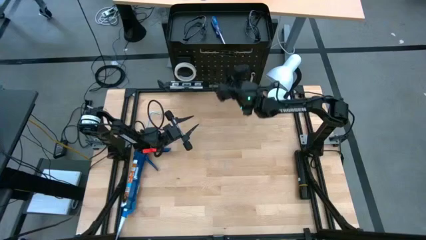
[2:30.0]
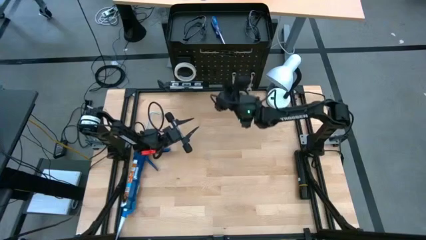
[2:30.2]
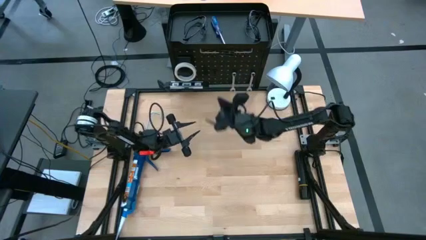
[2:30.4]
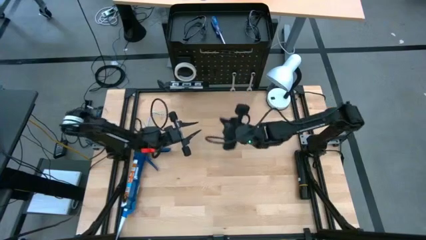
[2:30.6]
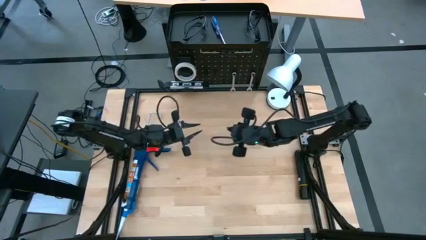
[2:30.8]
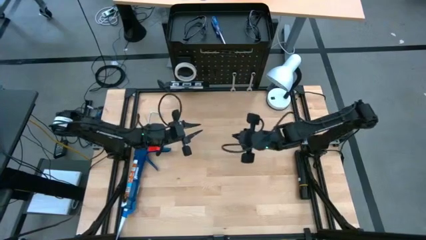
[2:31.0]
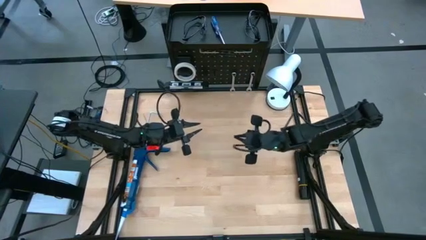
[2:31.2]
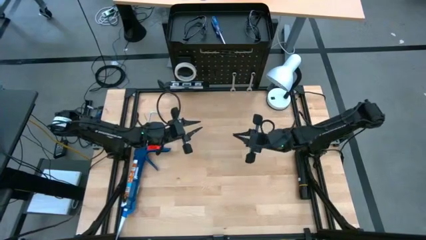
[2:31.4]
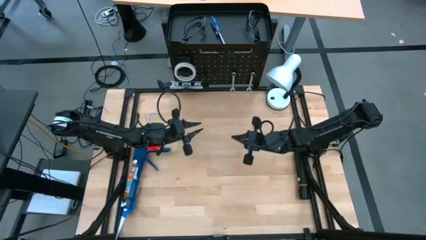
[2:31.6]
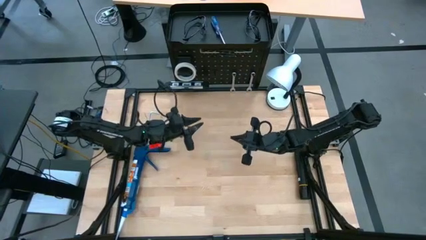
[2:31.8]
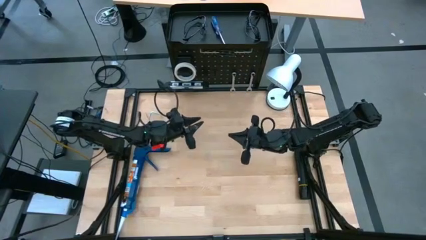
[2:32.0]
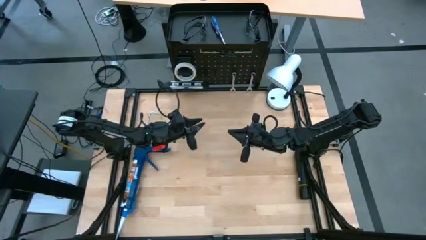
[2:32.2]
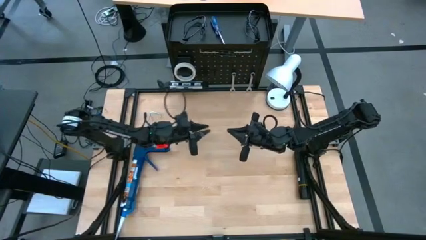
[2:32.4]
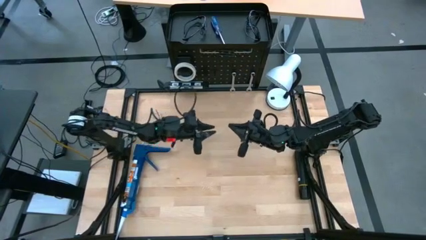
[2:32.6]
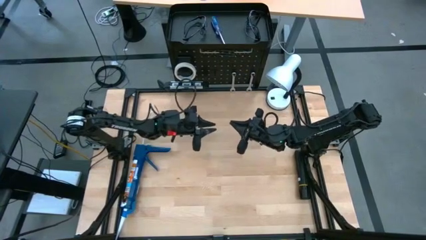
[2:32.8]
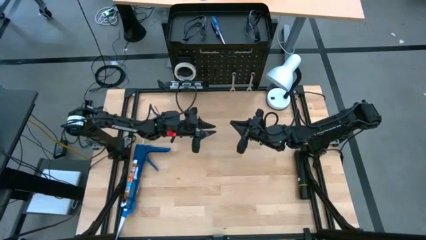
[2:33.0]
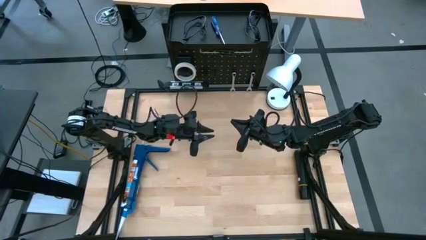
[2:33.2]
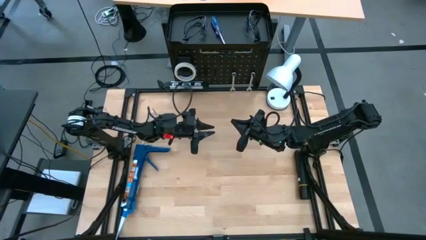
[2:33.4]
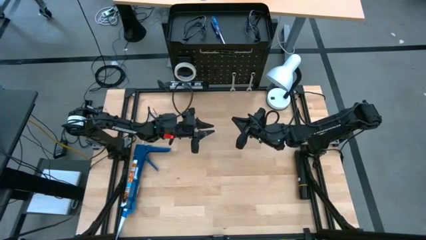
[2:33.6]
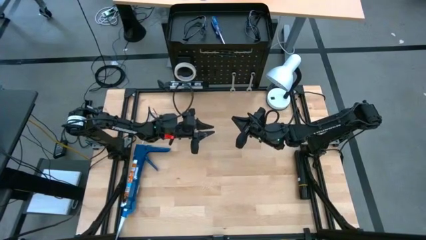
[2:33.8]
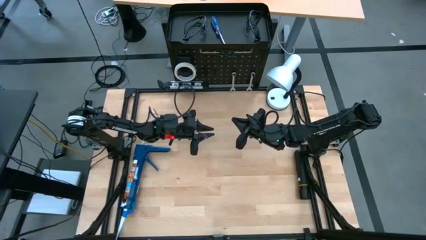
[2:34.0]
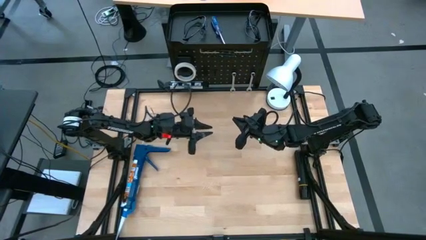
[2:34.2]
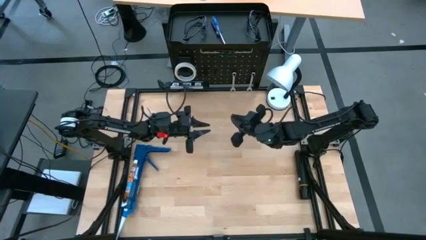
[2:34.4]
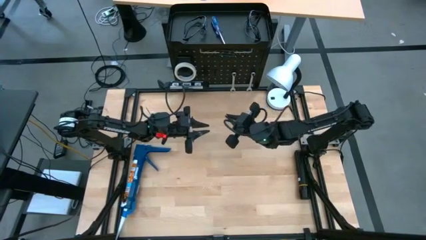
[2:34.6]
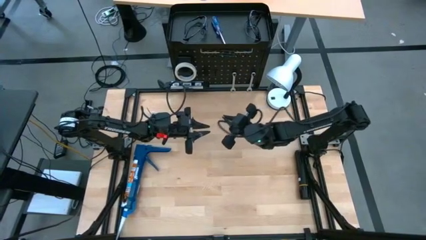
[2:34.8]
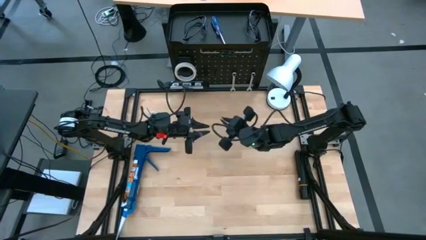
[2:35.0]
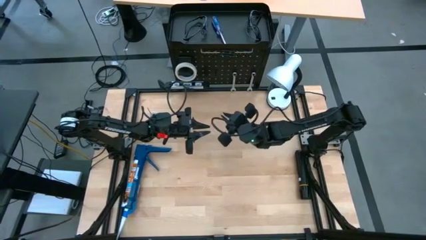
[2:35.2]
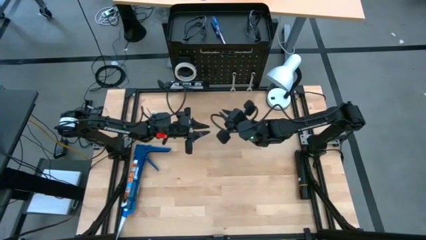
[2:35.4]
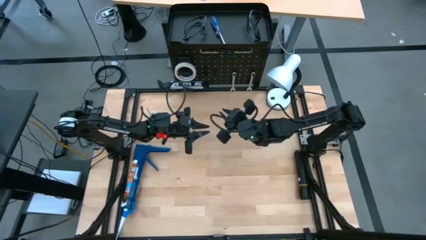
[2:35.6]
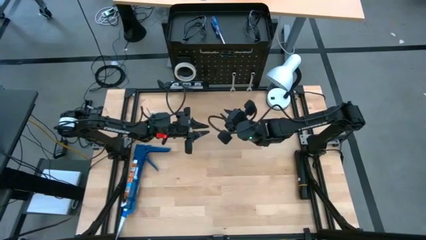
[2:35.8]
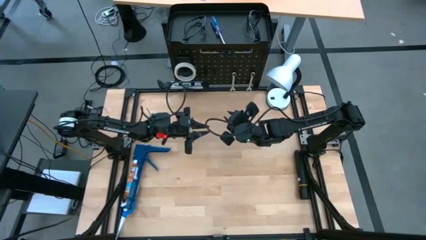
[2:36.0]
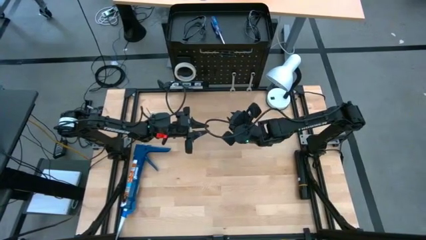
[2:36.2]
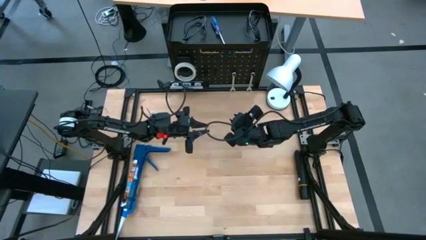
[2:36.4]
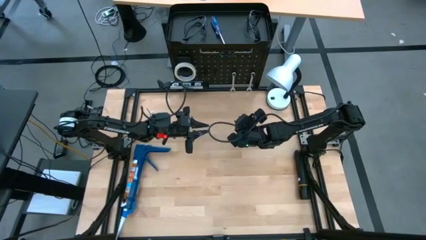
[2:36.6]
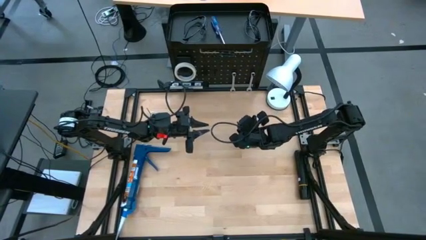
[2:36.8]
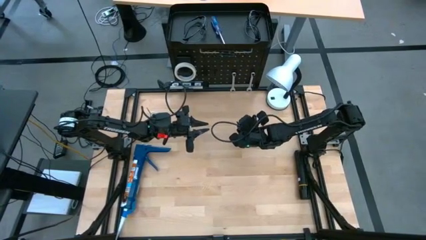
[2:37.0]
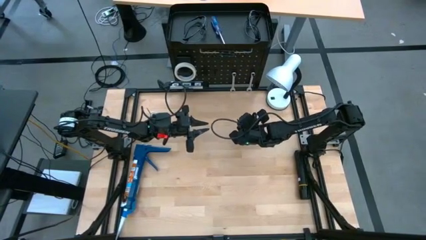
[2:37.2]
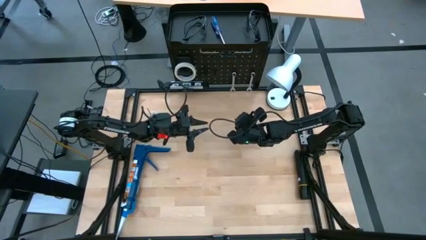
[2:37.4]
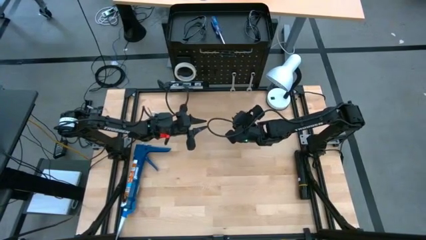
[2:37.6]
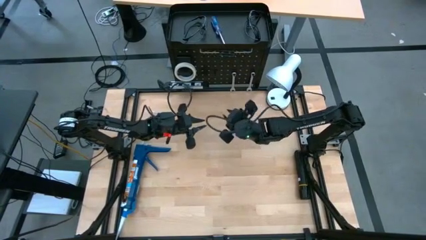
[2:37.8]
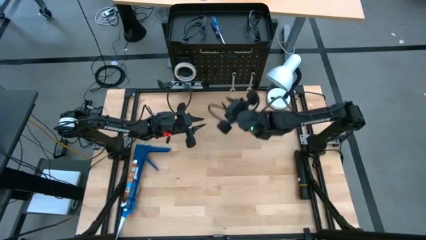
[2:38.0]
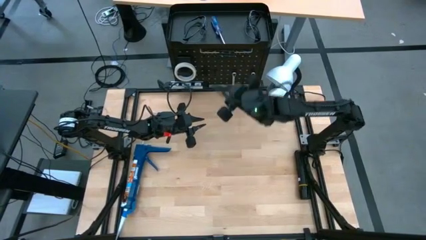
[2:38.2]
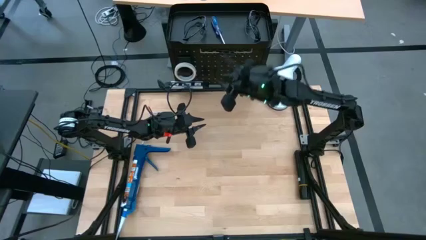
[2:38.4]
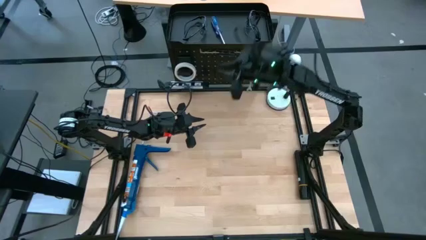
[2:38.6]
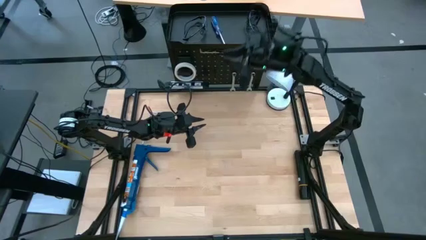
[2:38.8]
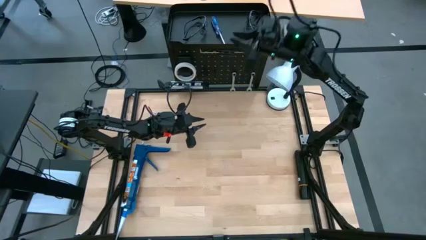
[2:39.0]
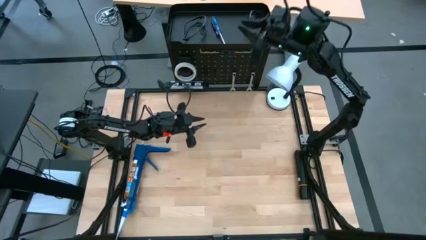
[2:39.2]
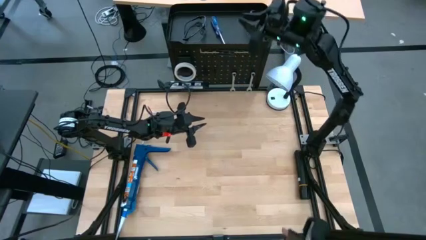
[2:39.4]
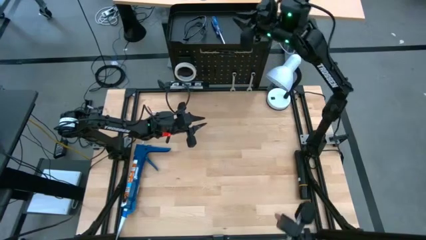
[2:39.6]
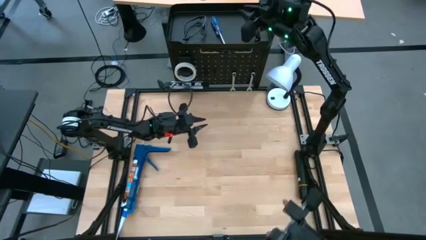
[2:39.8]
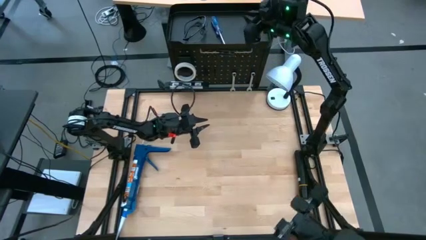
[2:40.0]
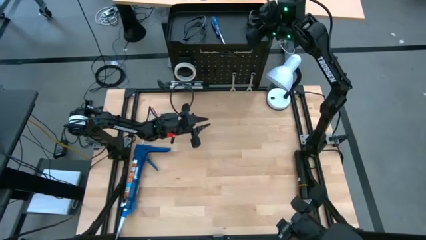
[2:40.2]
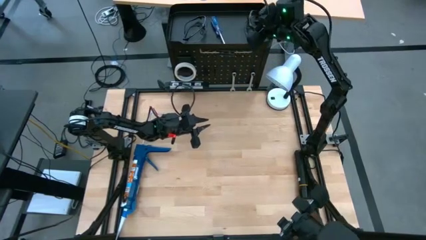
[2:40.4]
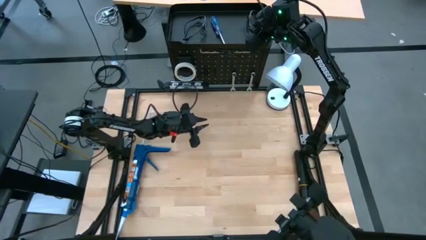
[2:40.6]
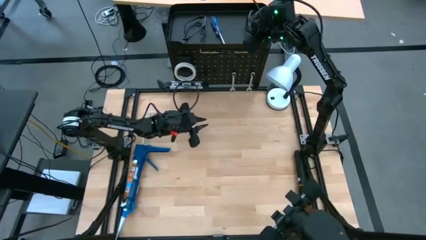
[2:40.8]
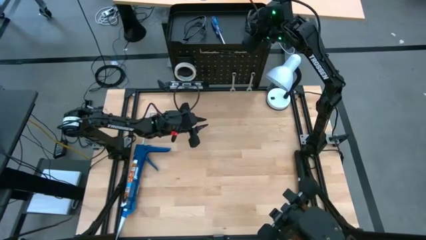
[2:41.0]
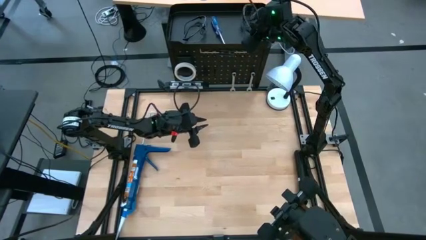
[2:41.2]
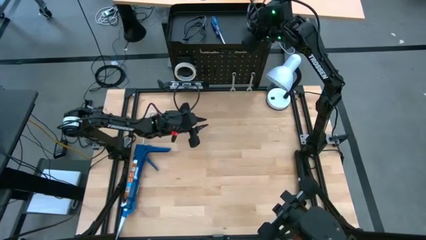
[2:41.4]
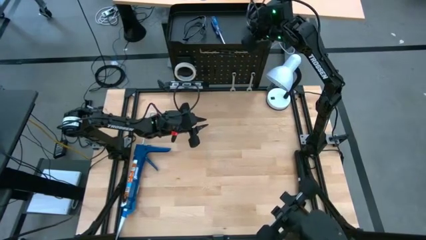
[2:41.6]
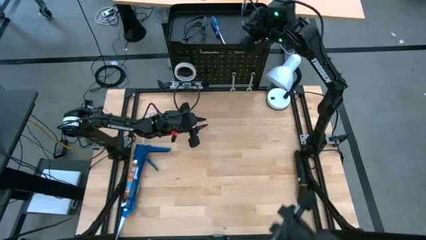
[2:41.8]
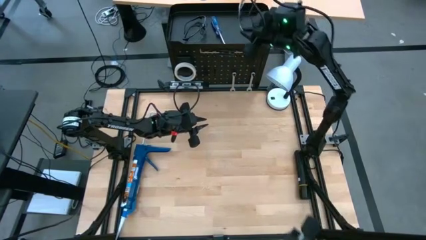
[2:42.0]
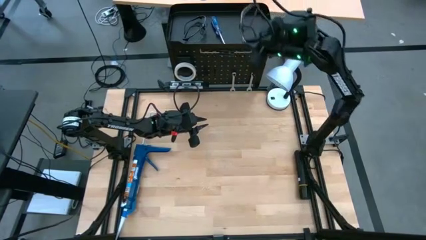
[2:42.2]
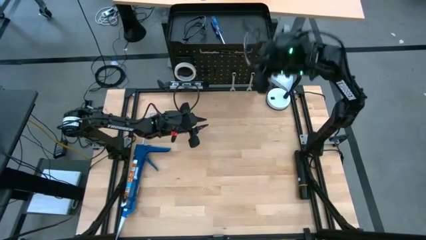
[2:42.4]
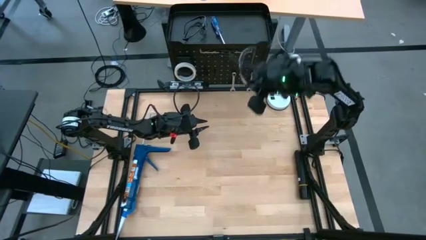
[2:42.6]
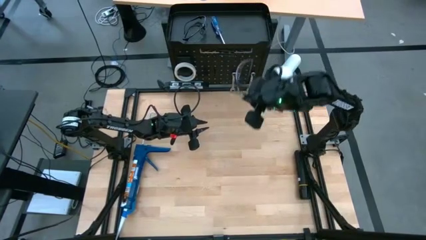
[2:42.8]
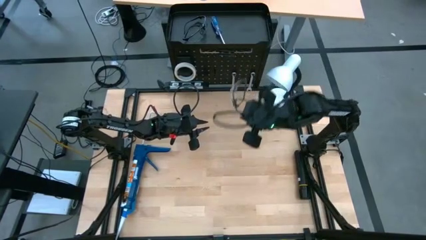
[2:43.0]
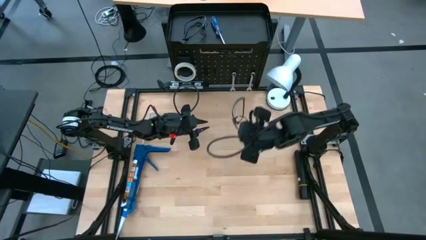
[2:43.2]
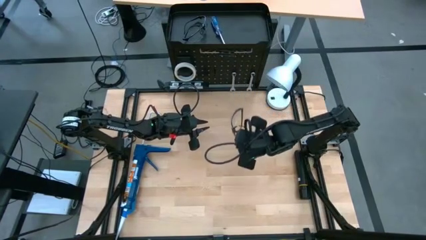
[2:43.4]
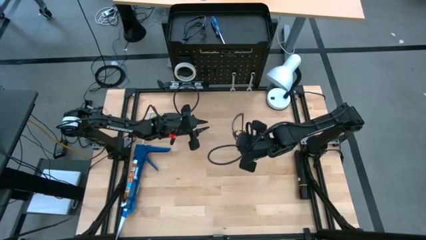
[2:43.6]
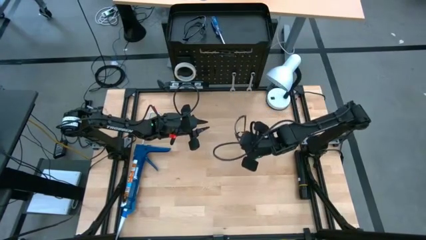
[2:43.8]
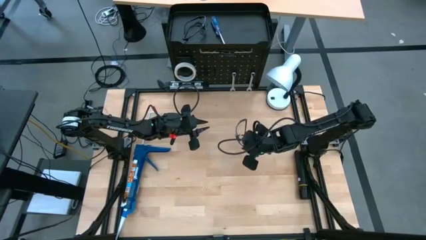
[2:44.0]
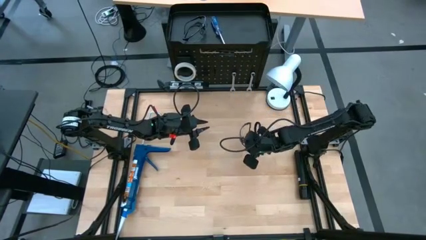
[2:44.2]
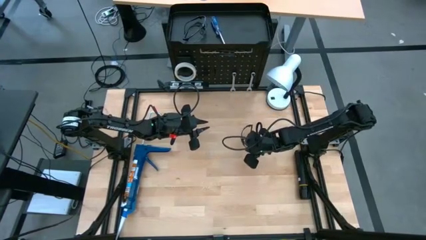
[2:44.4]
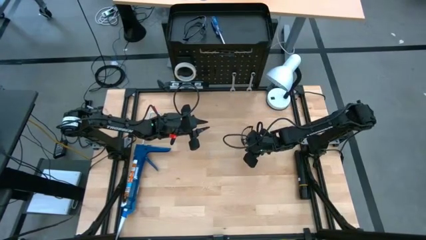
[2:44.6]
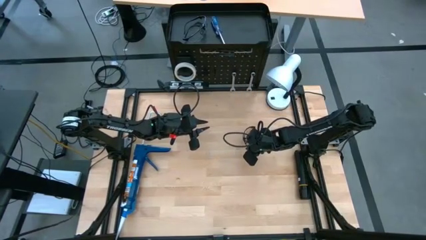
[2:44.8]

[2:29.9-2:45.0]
Task: Hang tools onto peg board
Remove the right safety glasses from the top of the peg board
